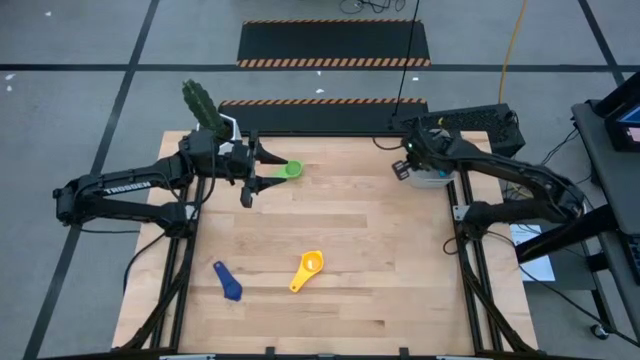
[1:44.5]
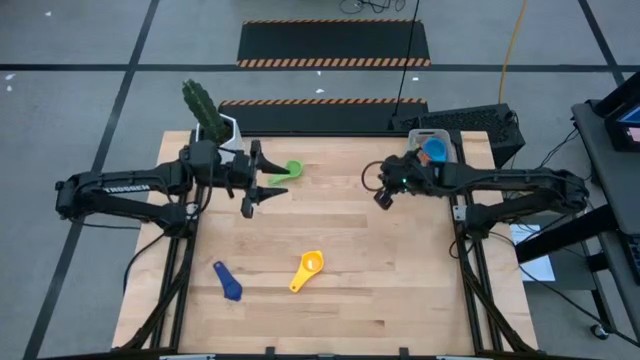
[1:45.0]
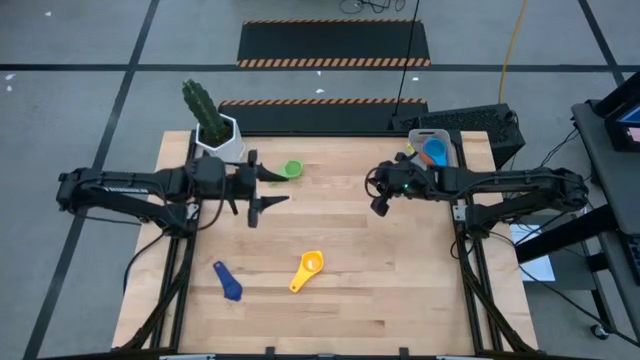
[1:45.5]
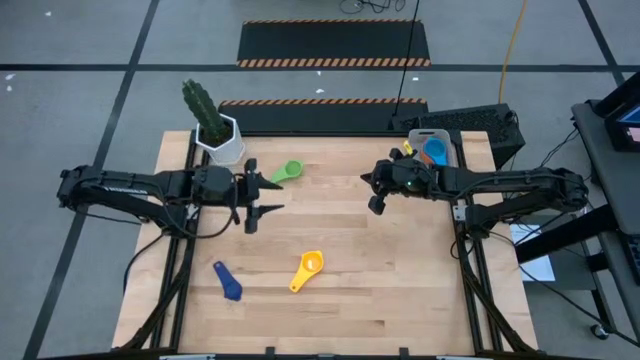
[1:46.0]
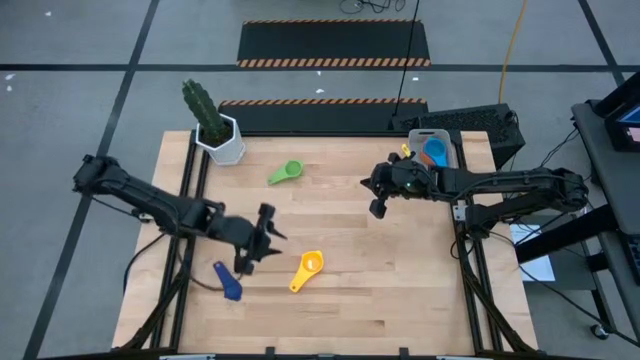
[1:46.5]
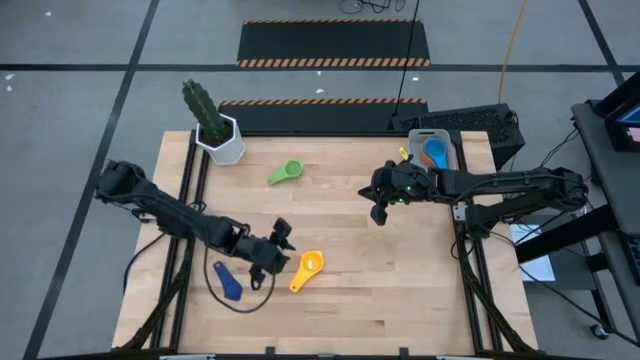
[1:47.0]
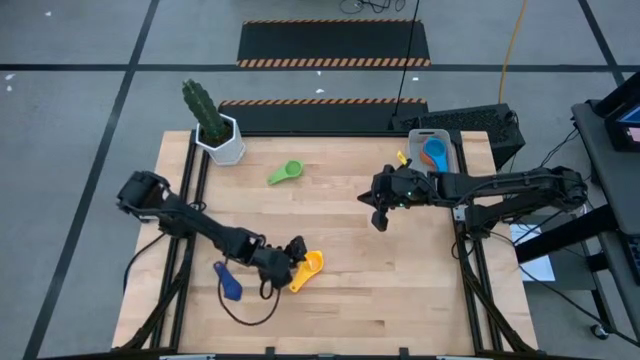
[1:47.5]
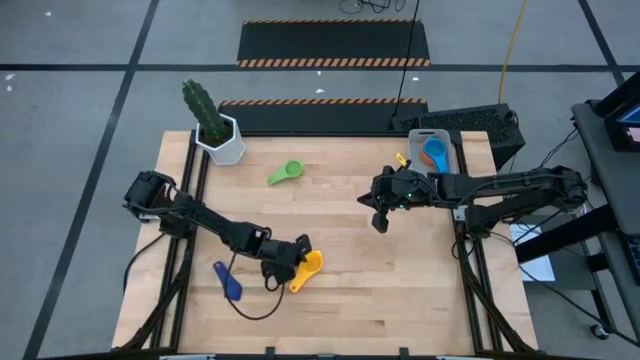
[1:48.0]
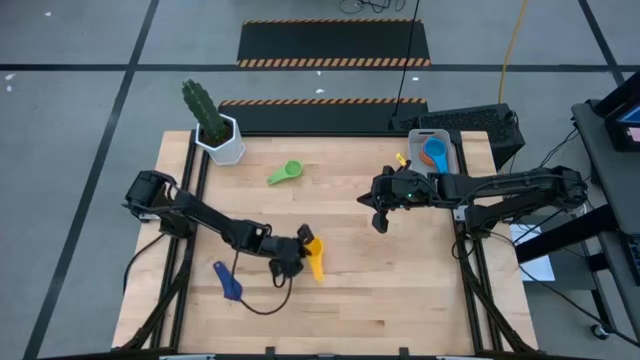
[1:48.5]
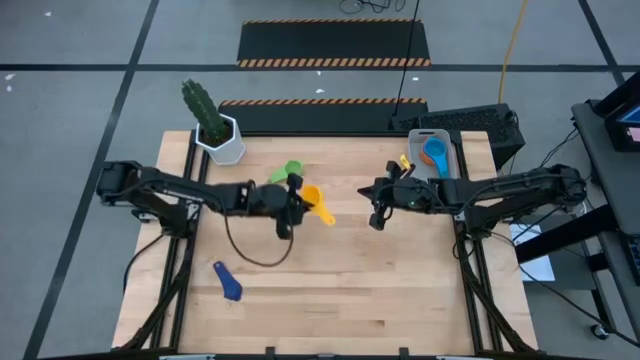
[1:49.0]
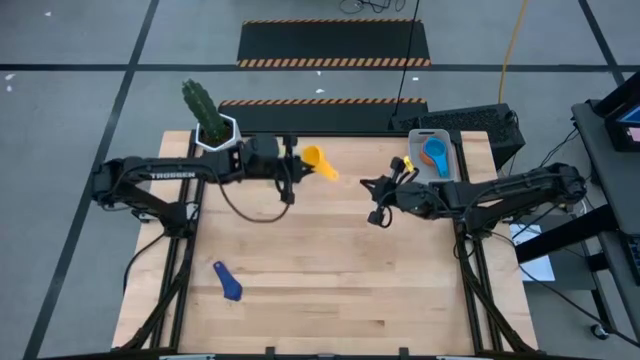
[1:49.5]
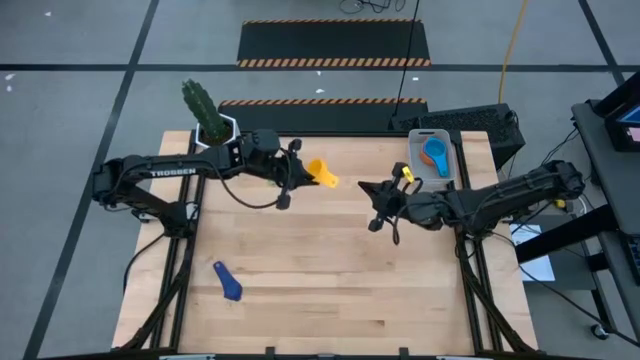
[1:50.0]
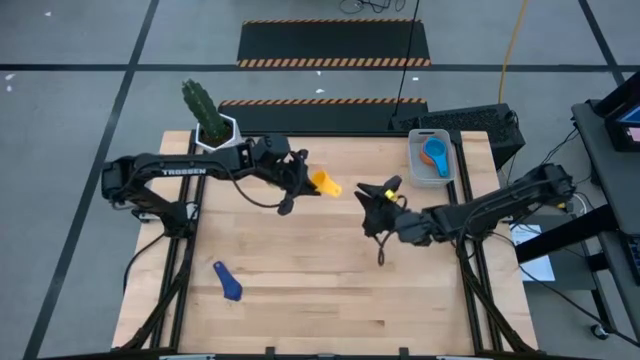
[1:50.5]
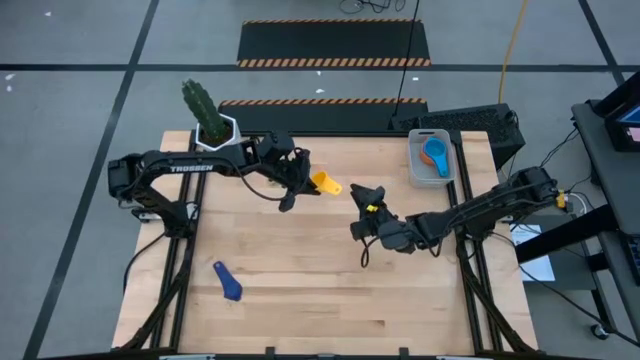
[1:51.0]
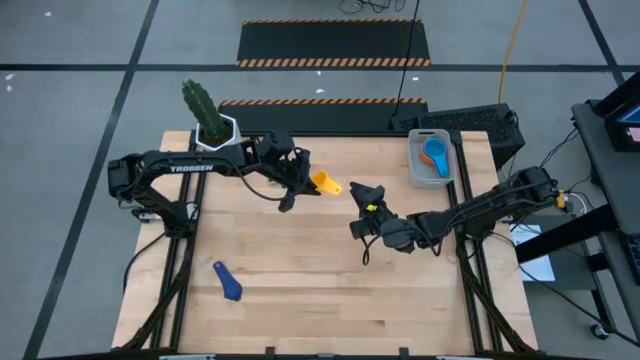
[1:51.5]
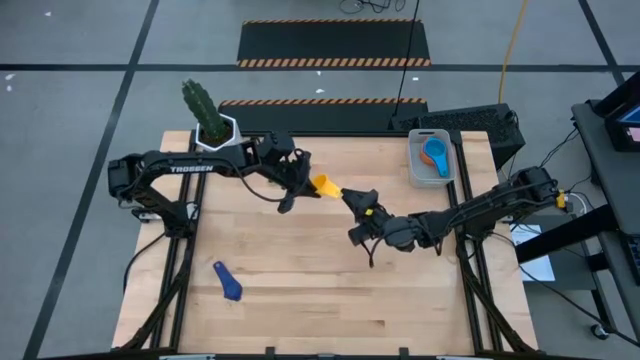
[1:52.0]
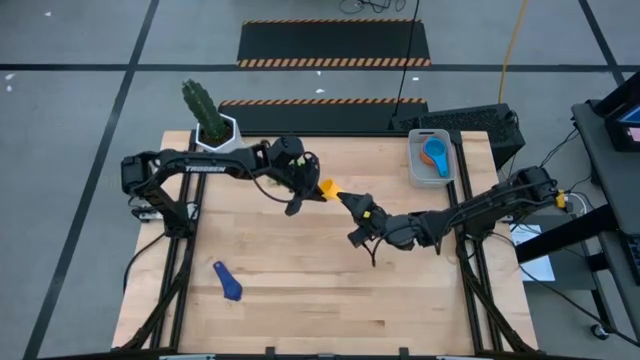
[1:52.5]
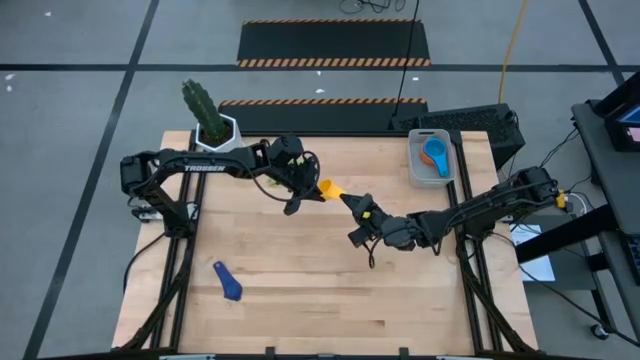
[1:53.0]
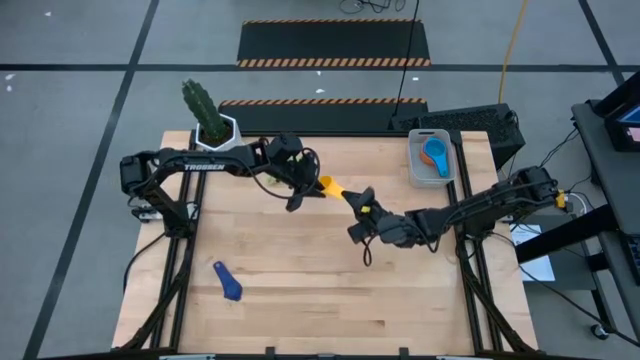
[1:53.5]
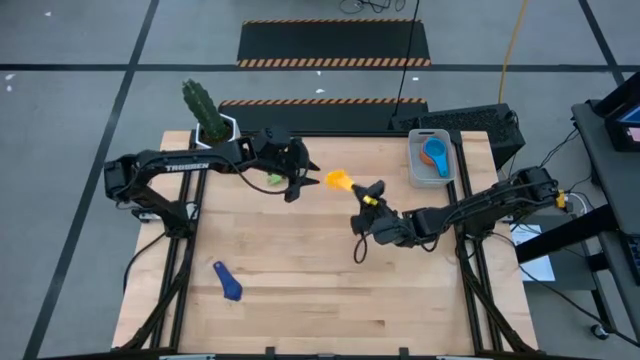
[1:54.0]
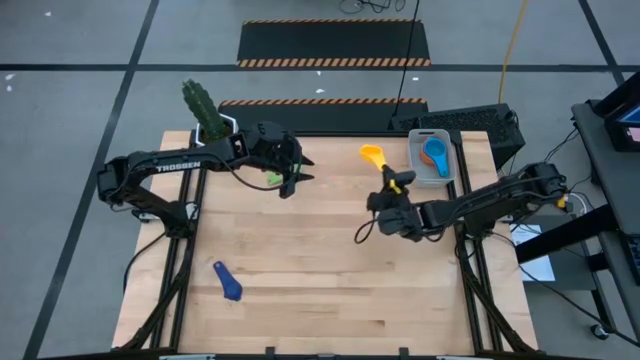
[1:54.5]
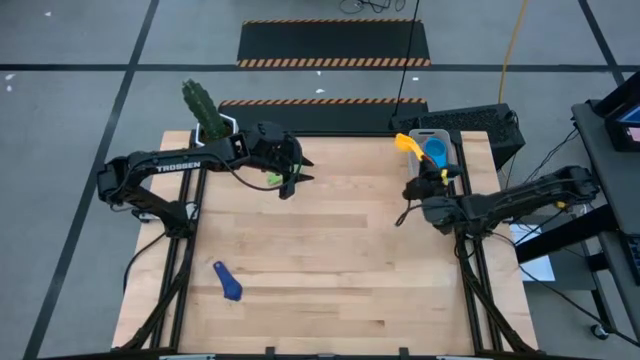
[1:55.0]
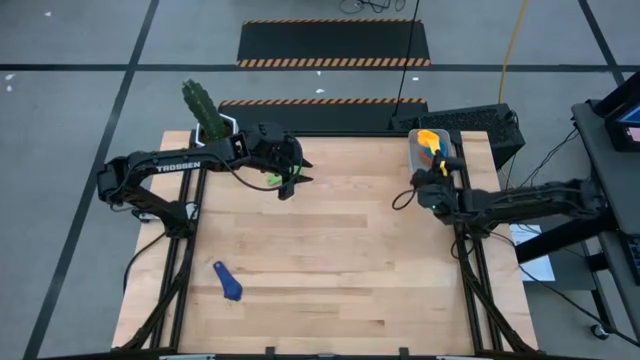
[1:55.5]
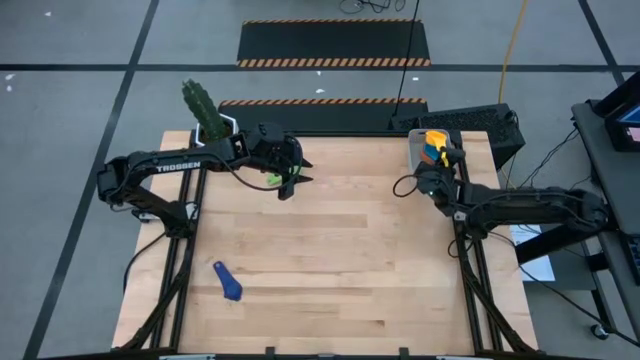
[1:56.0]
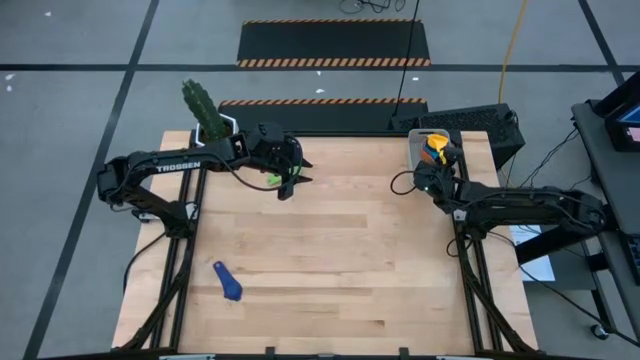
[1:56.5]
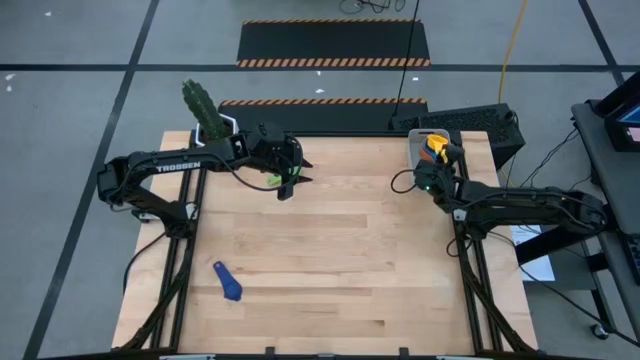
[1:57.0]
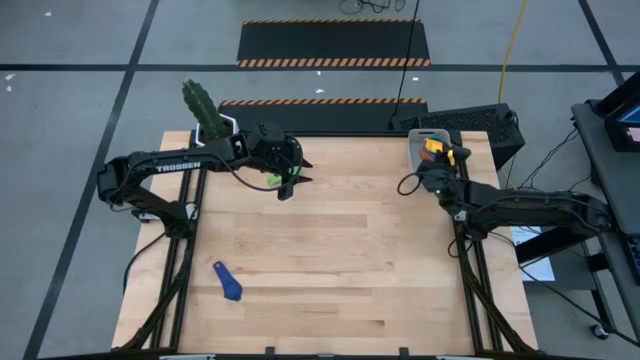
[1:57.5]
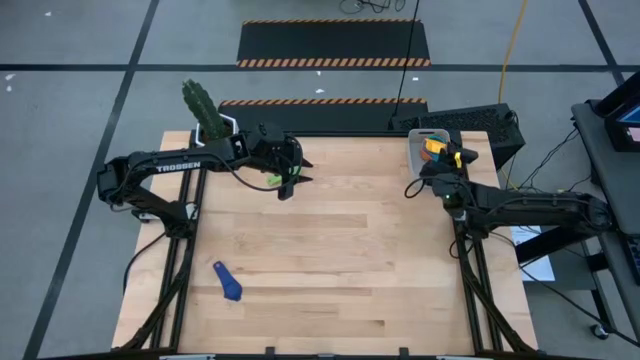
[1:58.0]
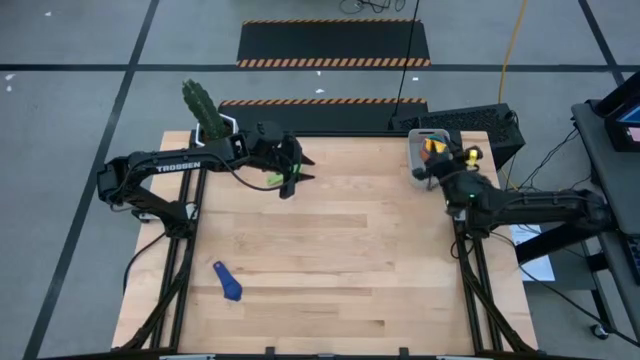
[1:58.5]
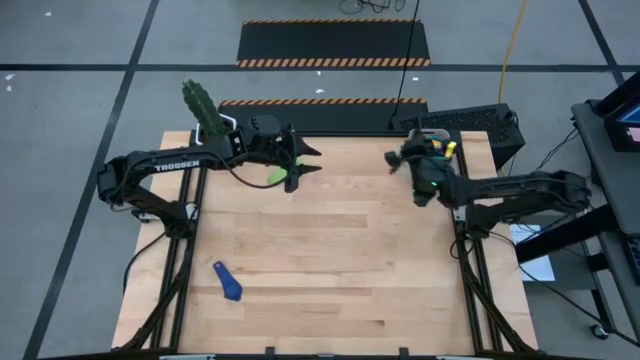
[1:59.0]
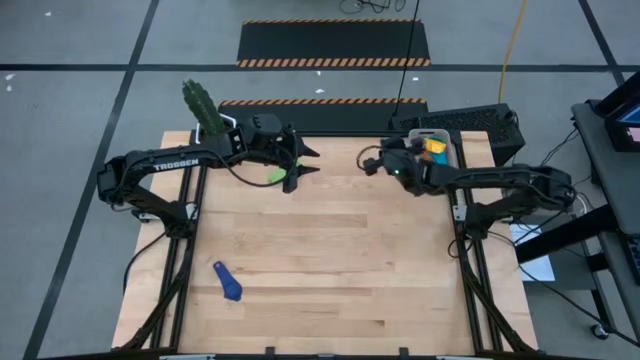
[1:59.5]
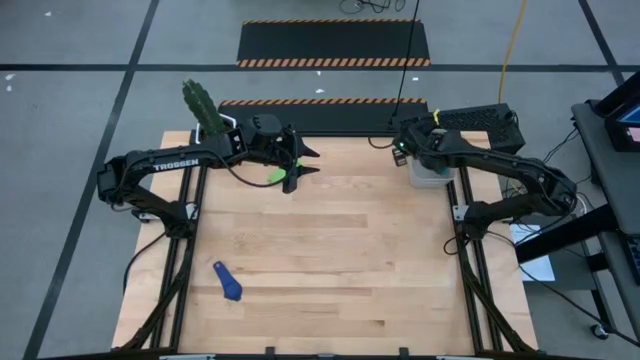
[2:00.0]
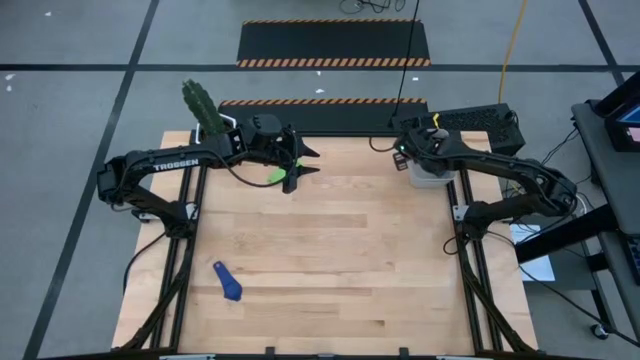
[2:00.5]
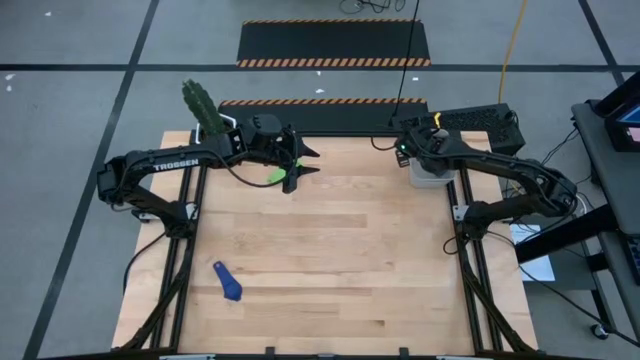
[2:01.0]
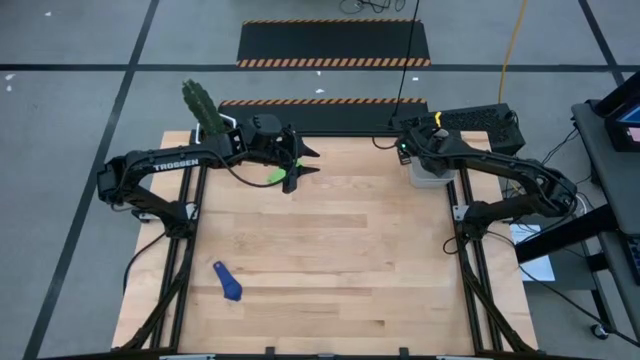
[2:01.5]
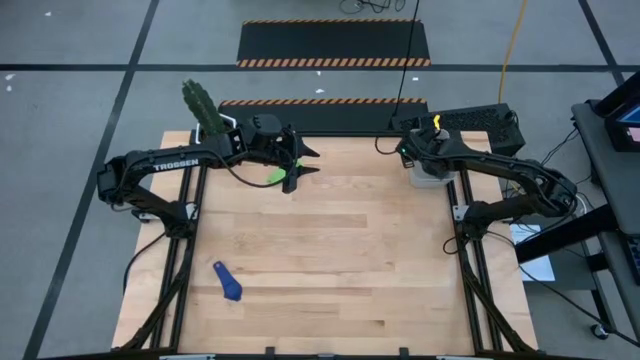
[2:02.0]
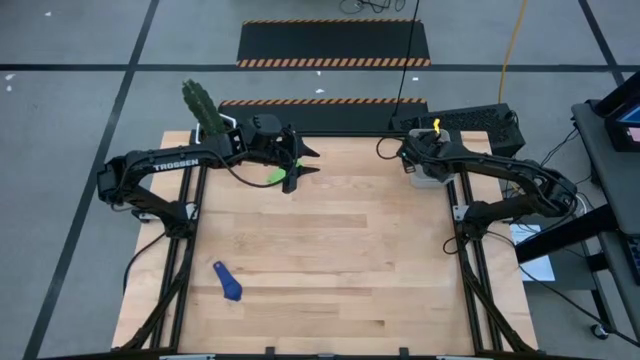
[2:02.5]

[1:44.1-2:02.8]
Task: Nest measuring cups in basket
Stack the yellow measuring cup on top of the light blue measuring cup in the gray bin

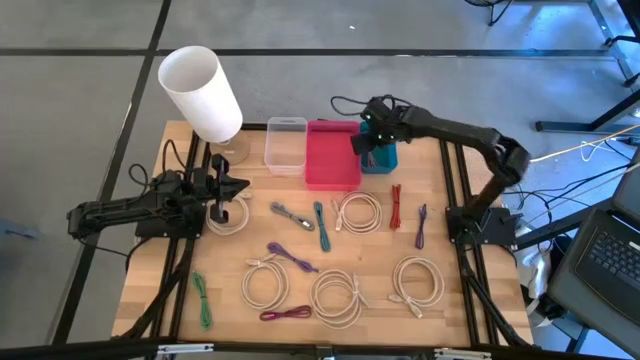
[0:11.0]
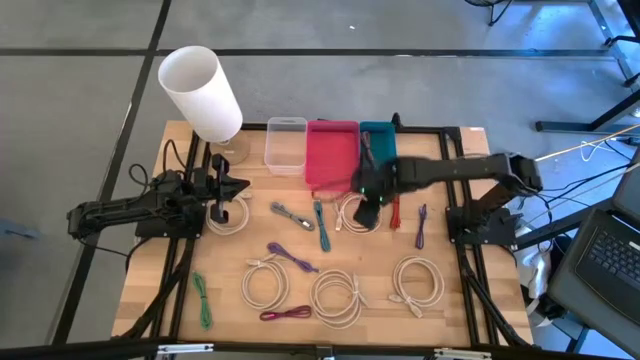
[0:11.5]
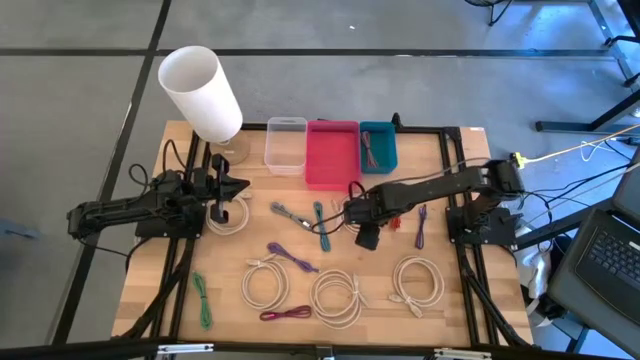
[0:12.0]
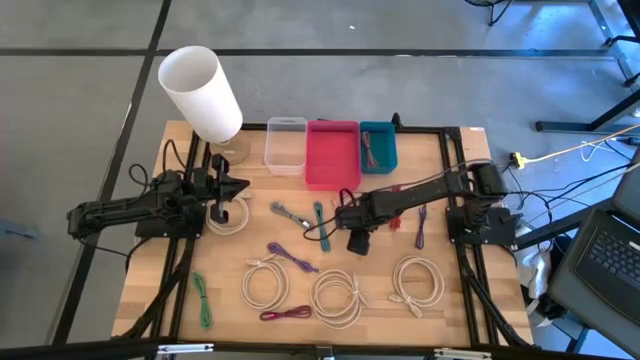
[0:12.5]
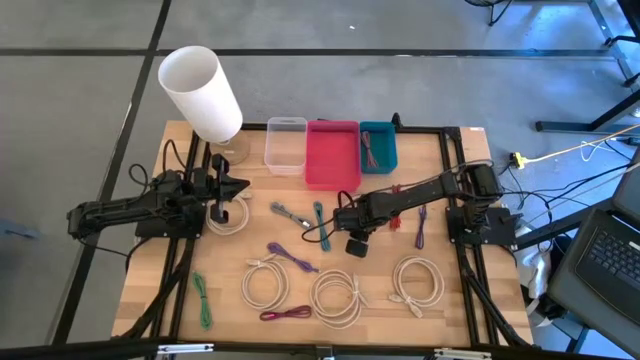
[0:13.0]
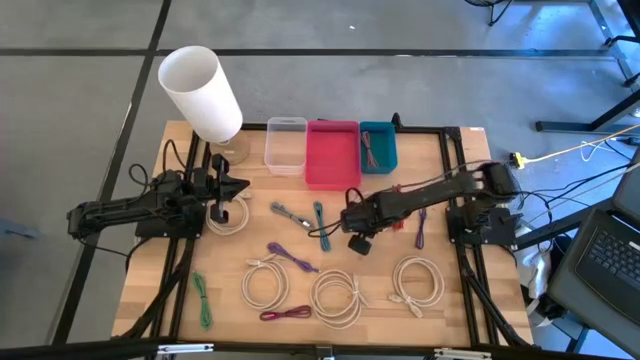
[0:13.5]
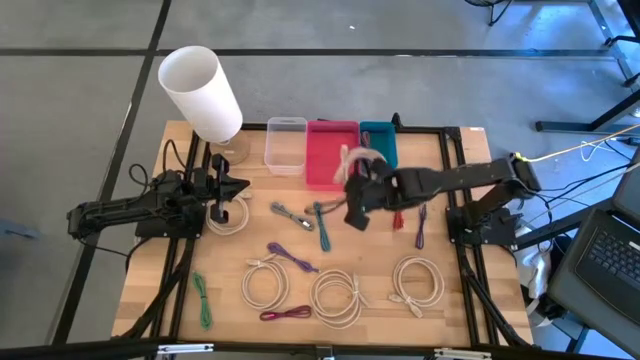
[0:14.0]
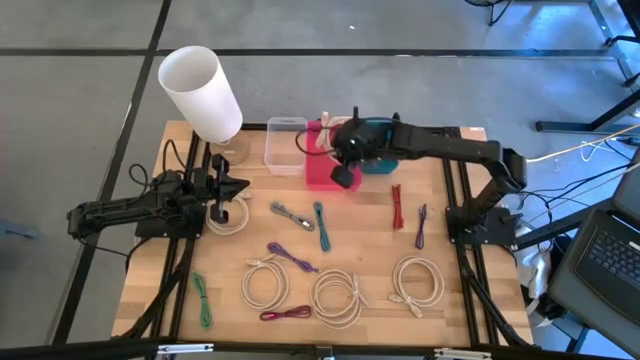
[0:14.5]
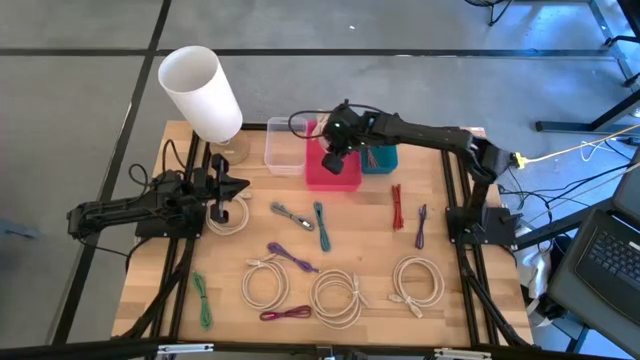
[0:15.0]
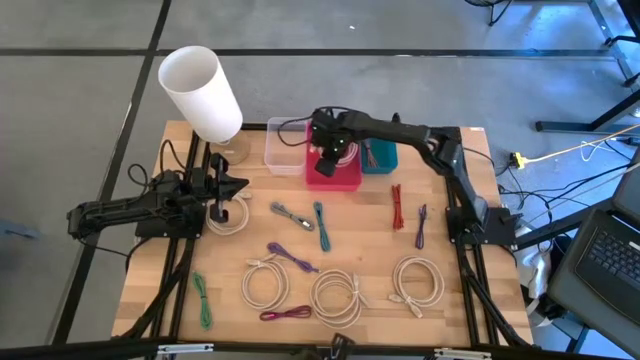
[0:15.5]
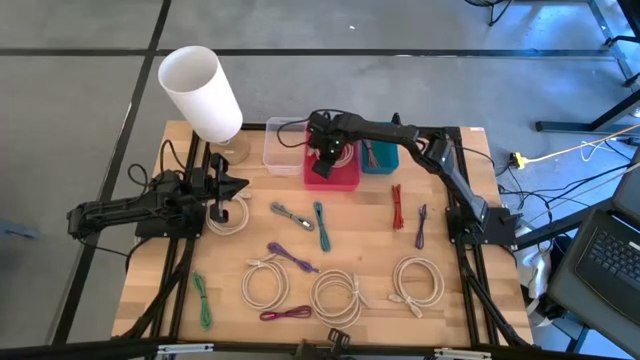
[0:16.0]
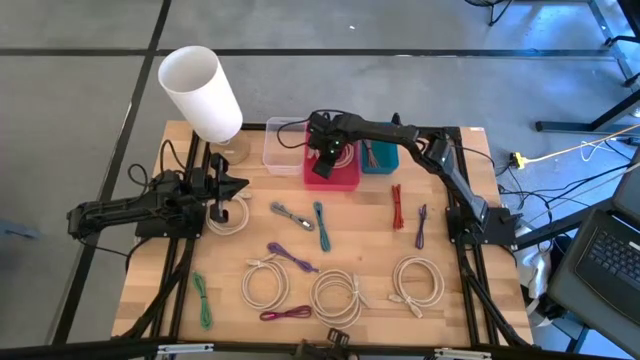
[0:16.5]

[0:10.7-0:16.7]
Task: Pick & Place USB Port
Put the brown HDMI cable into the red bin
